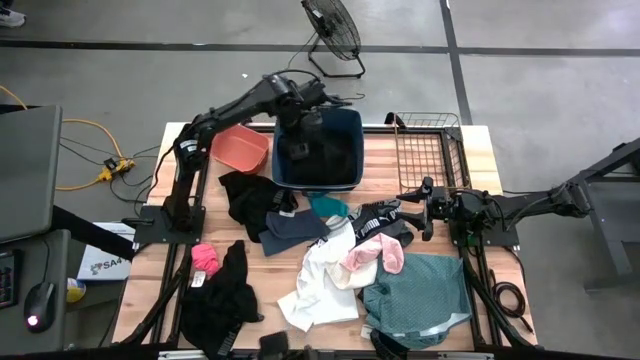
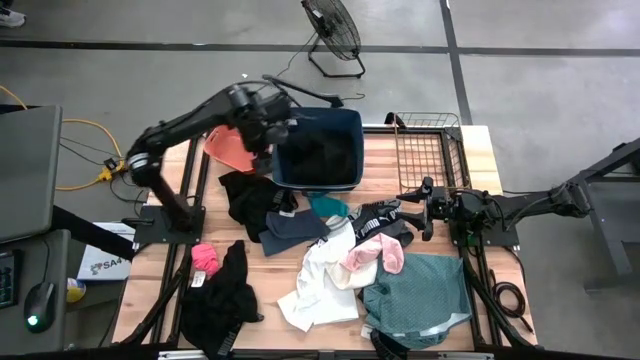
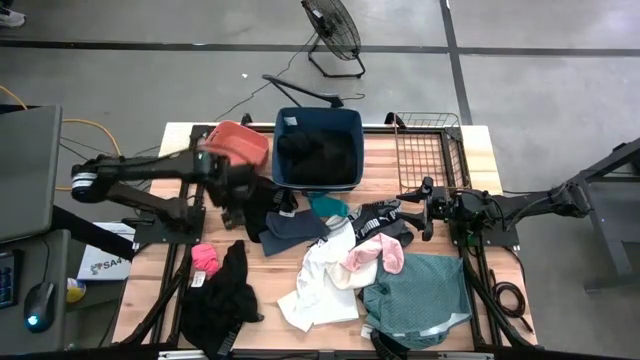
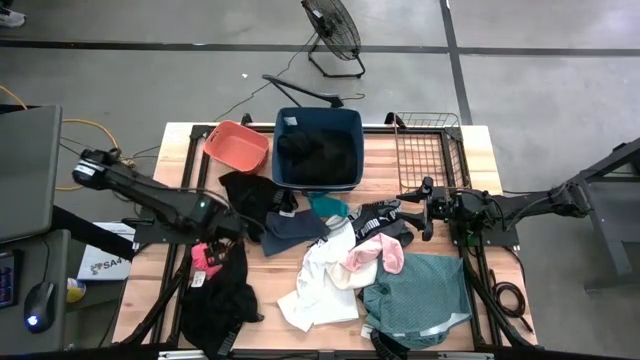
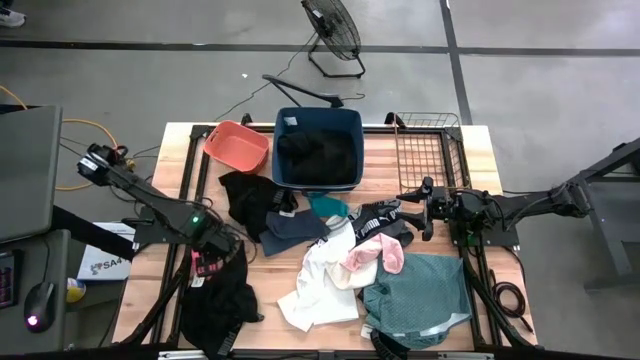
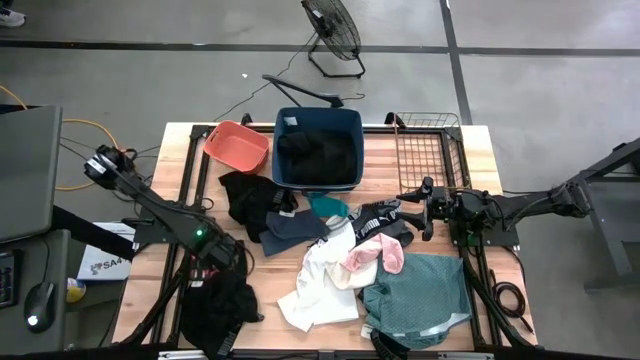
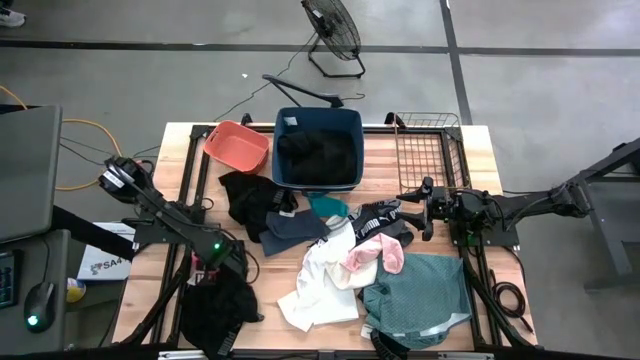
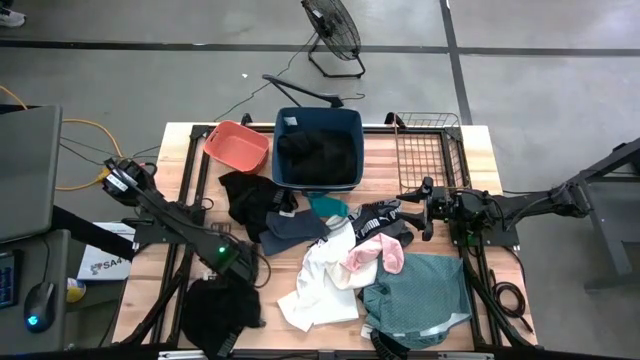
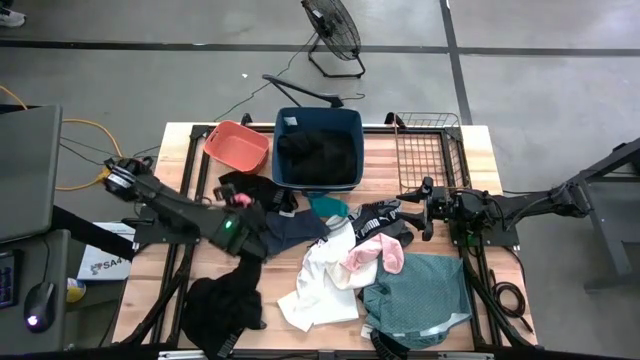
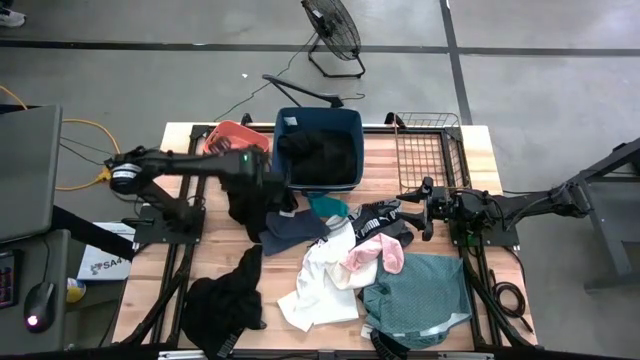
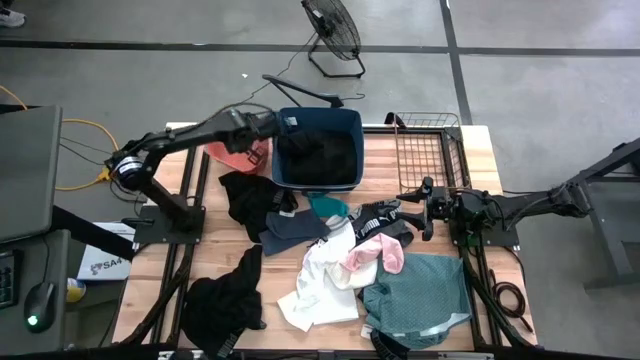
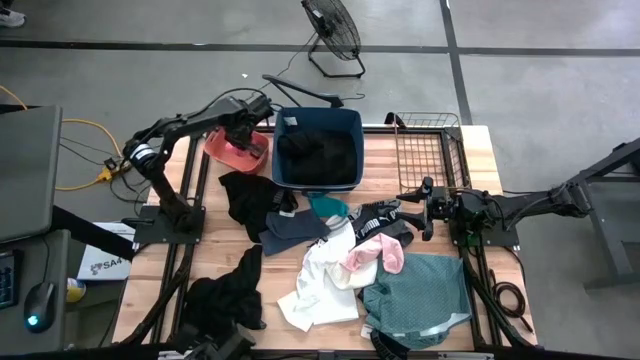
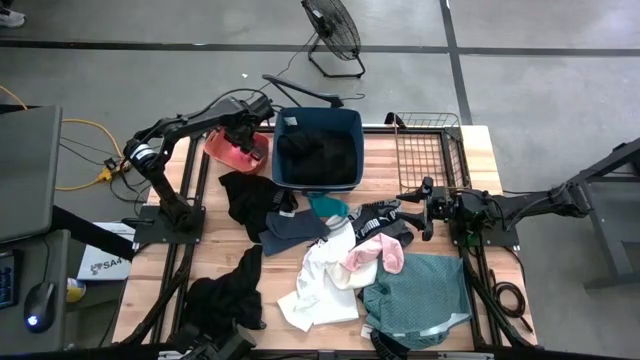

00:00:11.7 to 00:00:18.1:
Task: Pick & Place Cloths
Put the pink sock into the orange bin

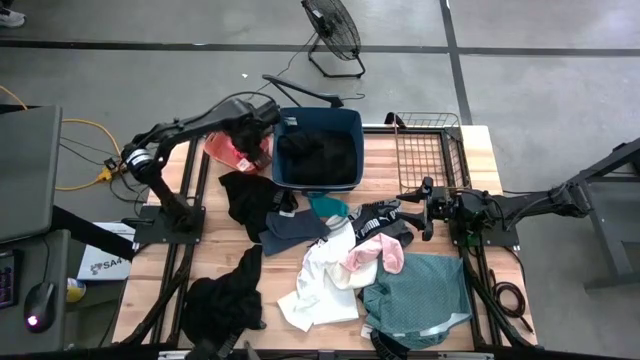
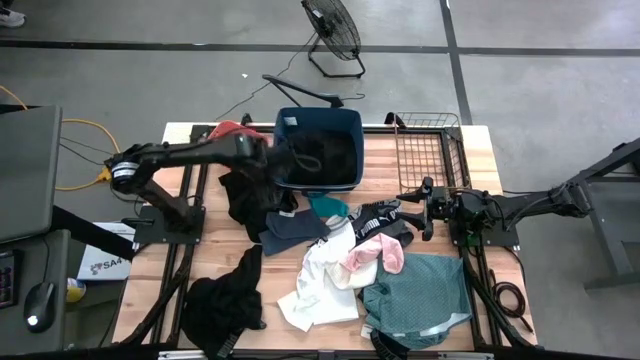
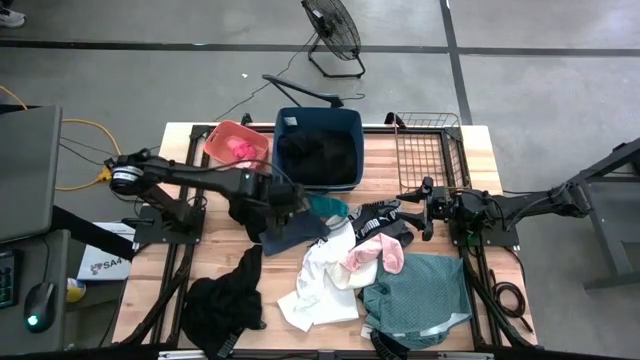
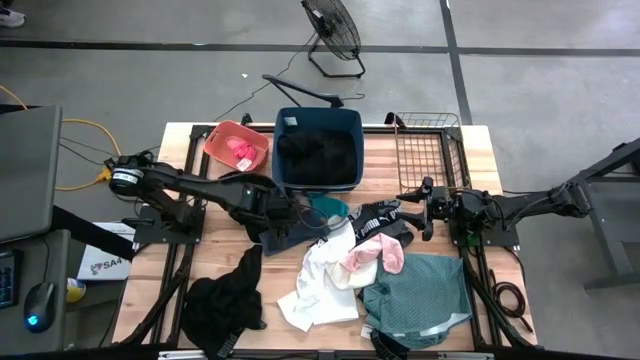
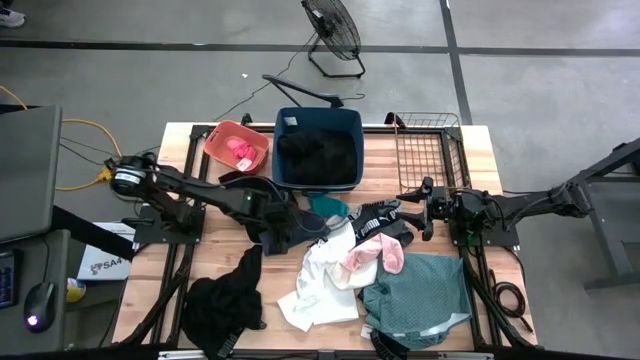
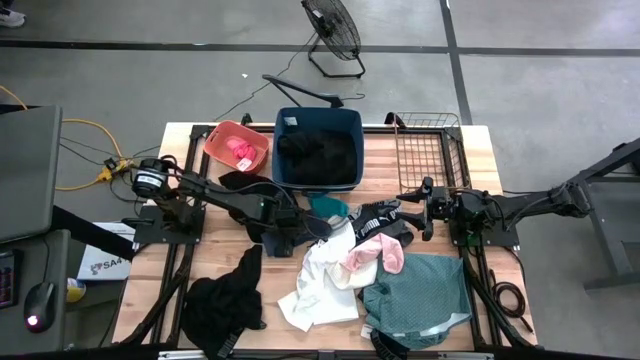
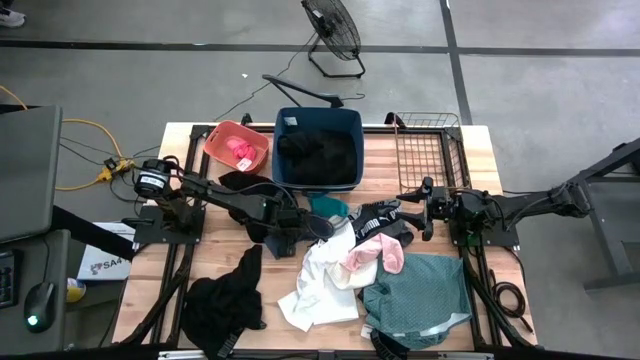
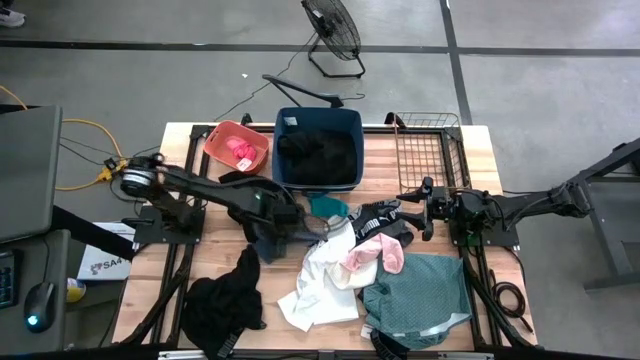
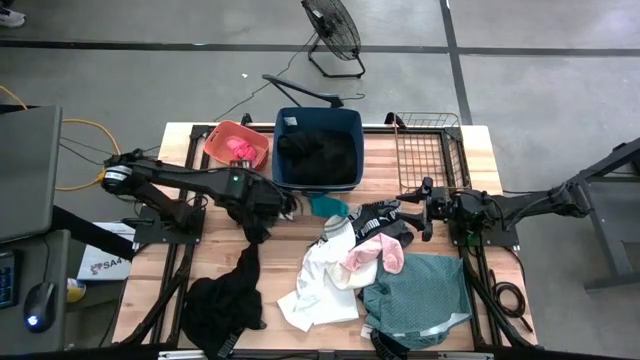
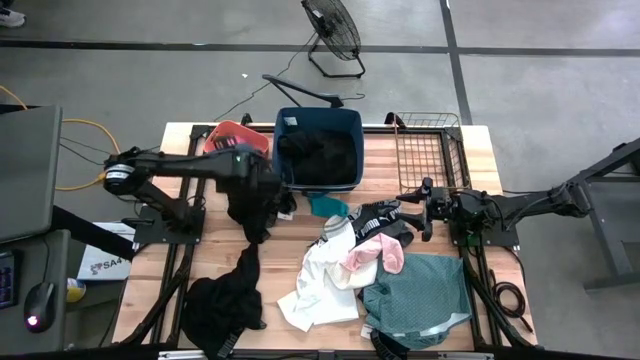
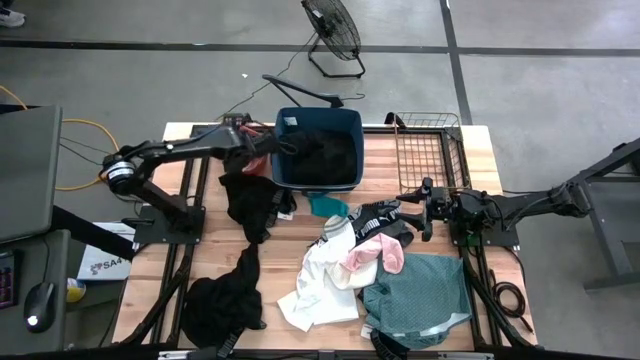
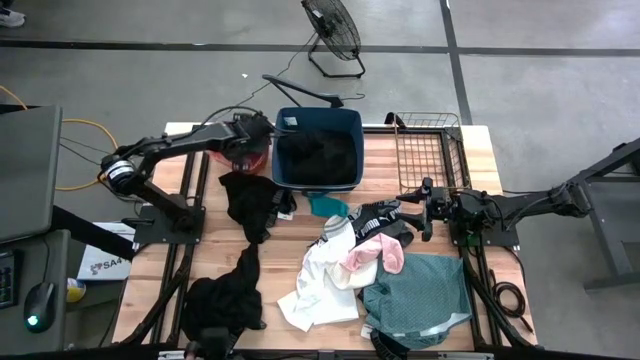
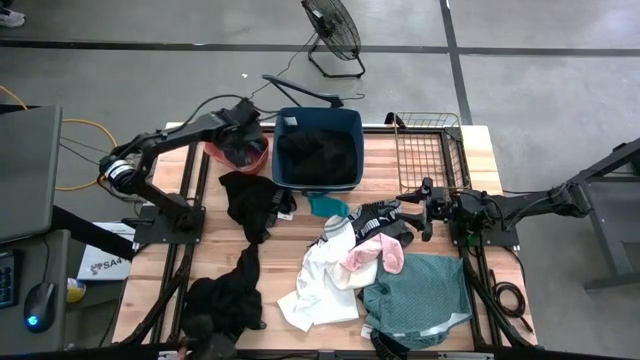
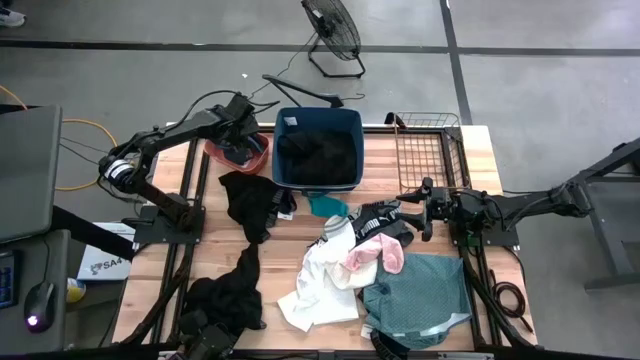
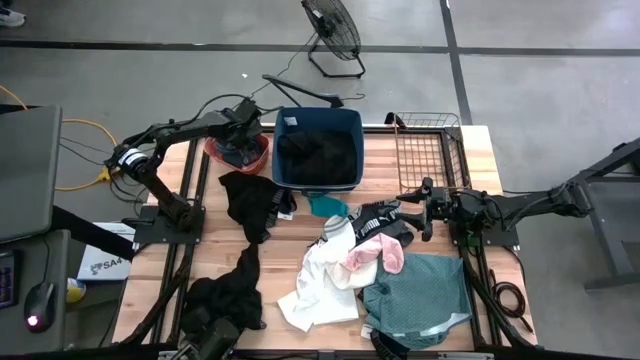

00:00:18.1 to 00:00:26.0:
Put the dark blue sock into the orange bin

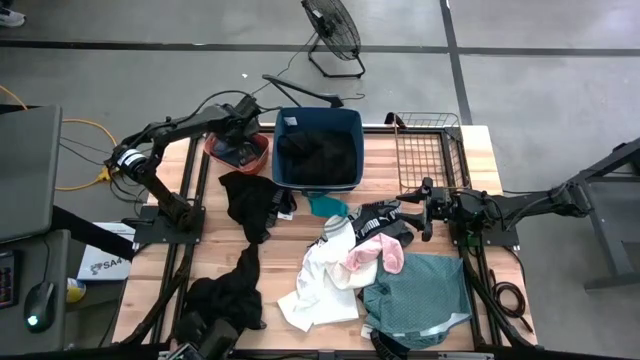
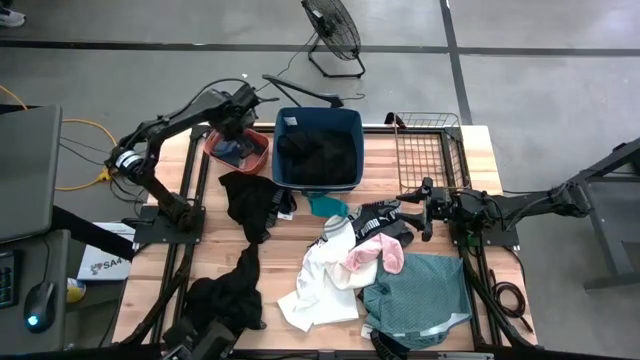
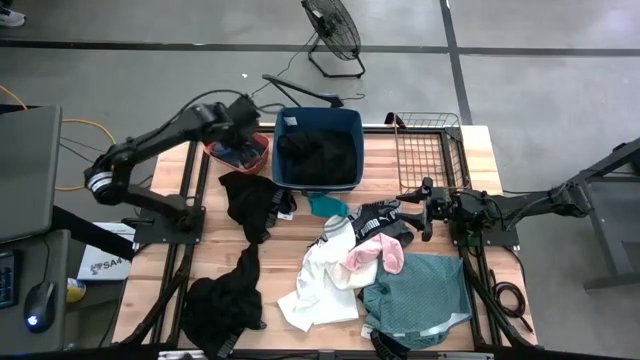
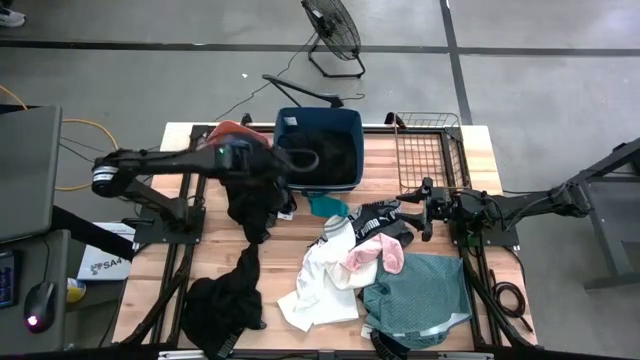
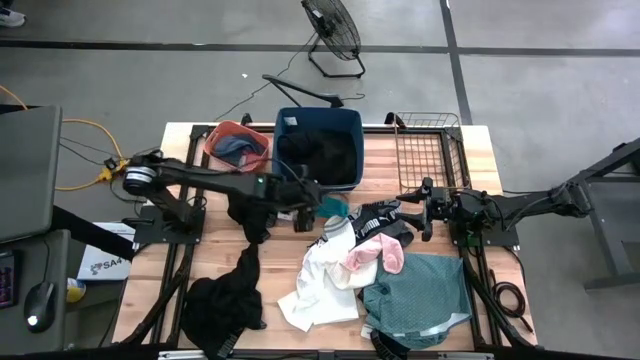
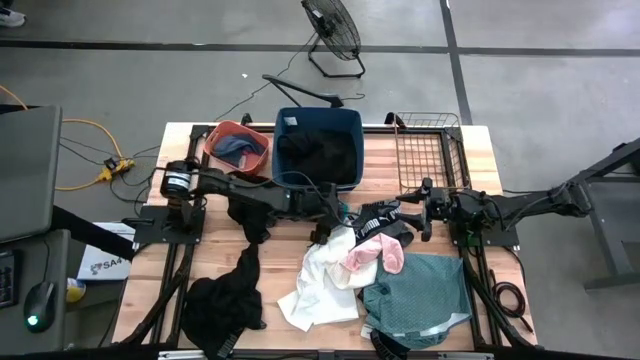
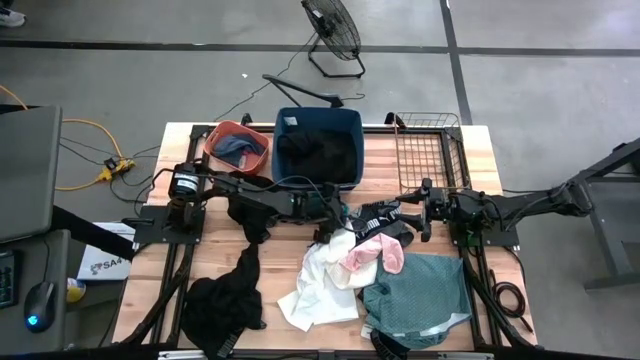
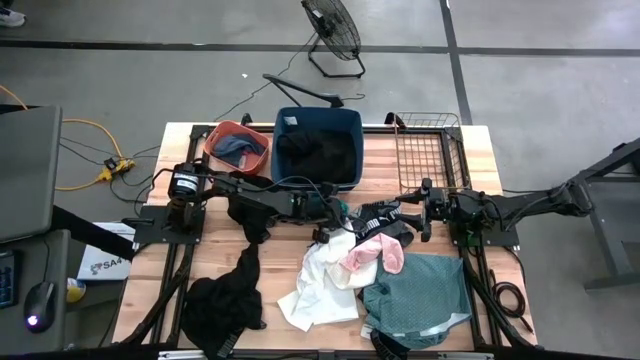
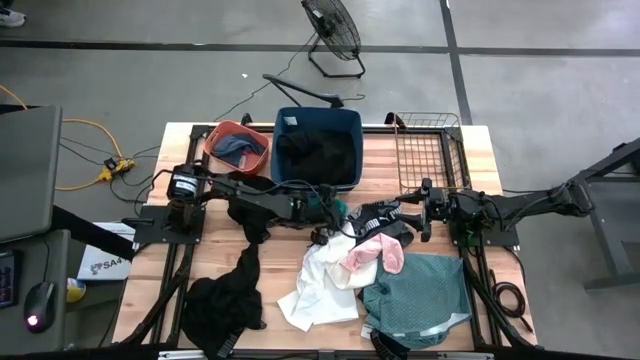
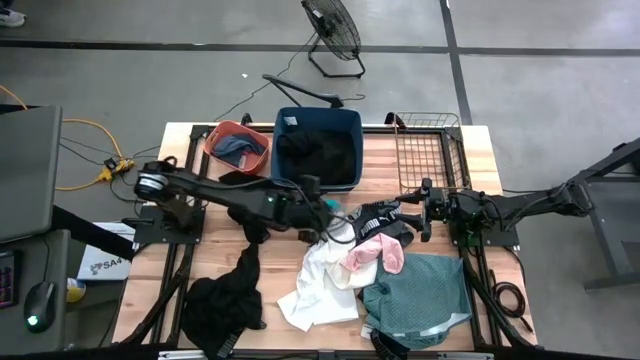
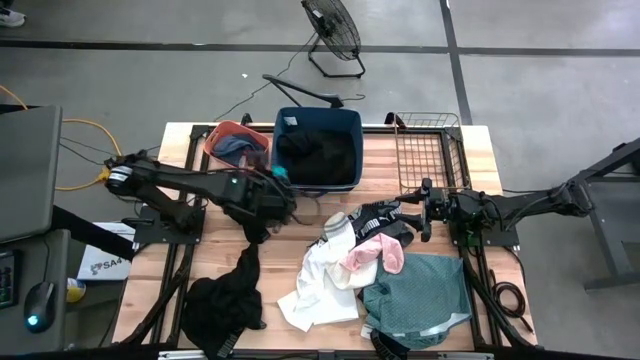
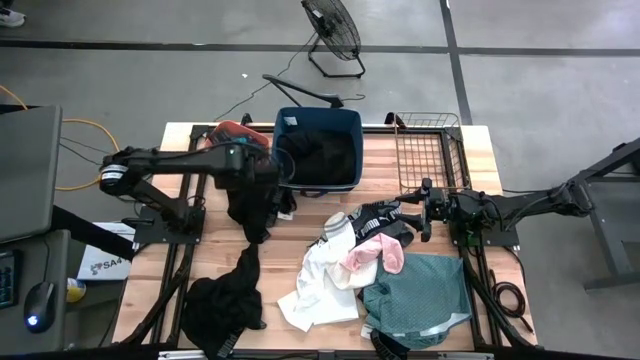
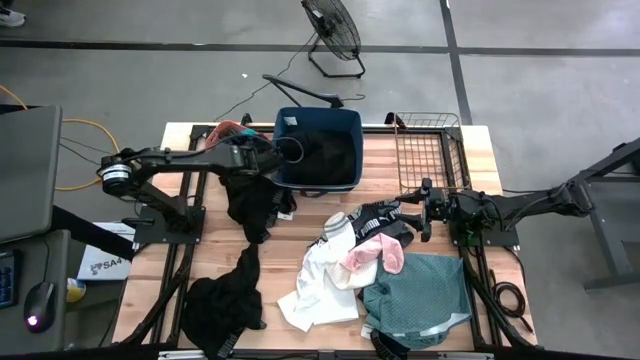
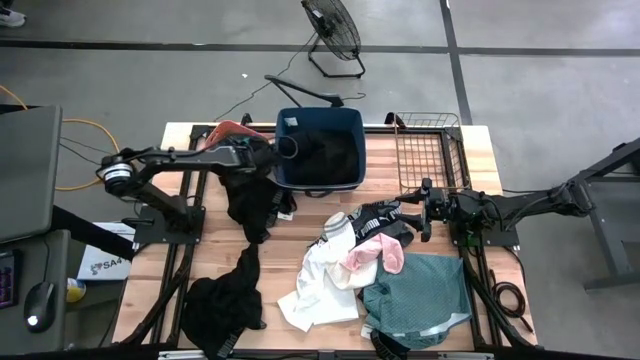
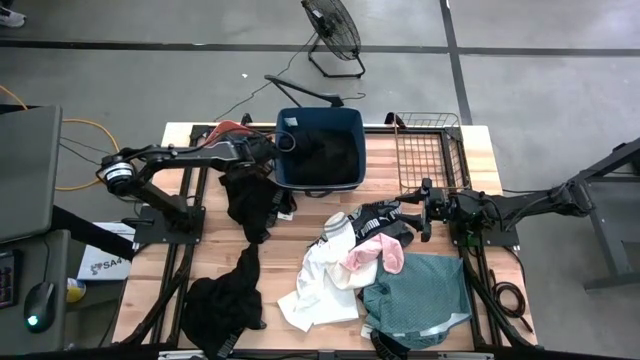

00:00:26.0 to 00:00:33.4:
Put the blue sock into the orange bin
